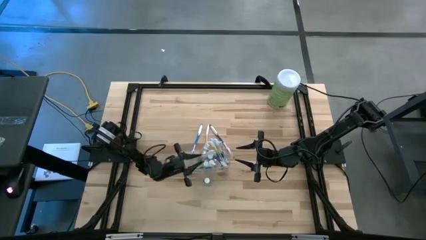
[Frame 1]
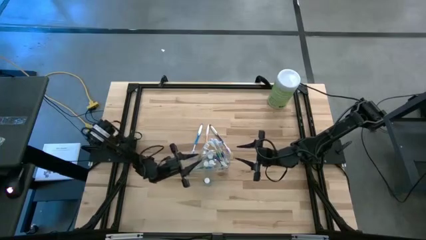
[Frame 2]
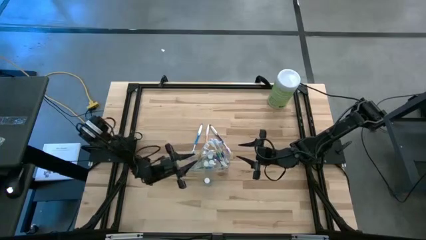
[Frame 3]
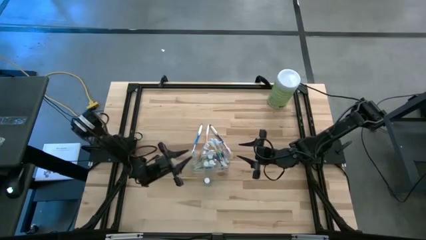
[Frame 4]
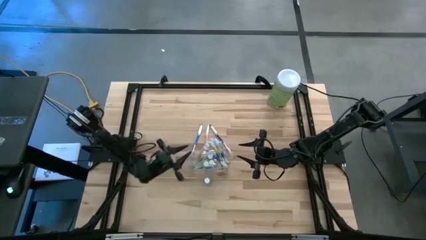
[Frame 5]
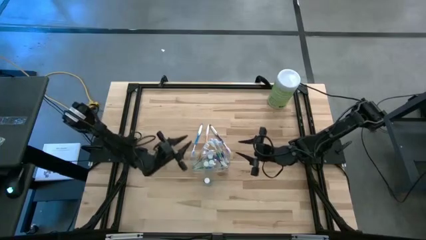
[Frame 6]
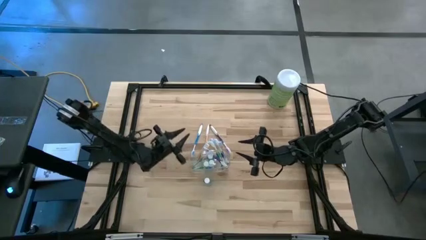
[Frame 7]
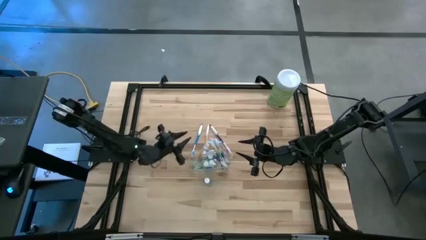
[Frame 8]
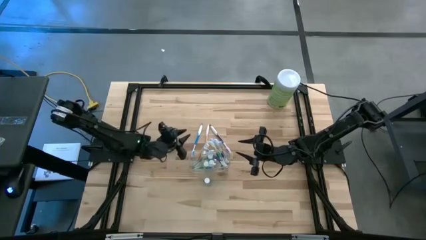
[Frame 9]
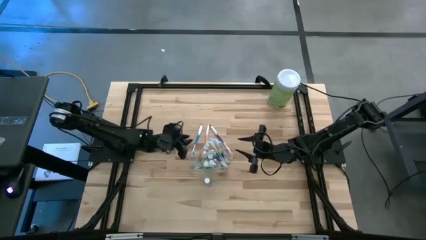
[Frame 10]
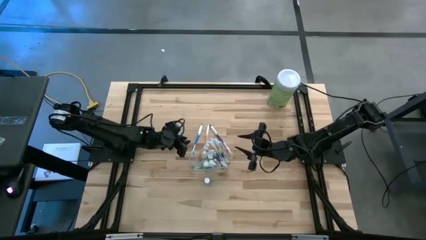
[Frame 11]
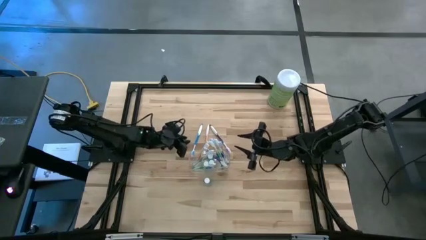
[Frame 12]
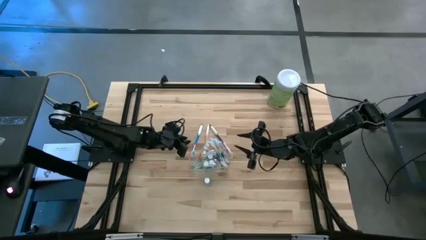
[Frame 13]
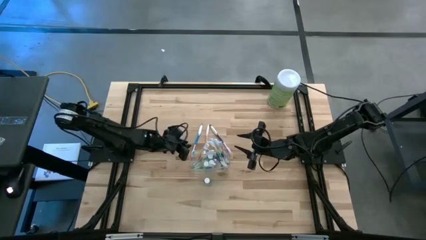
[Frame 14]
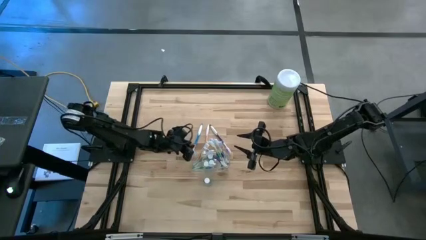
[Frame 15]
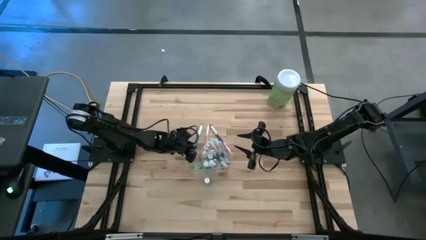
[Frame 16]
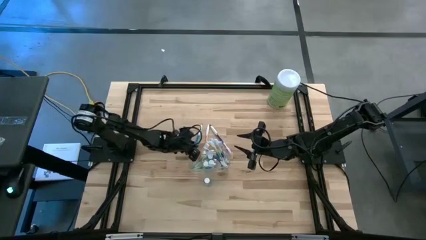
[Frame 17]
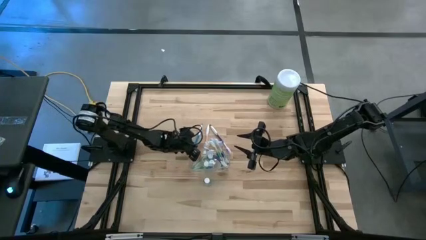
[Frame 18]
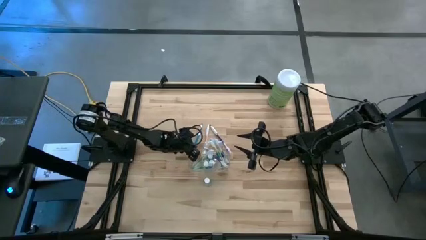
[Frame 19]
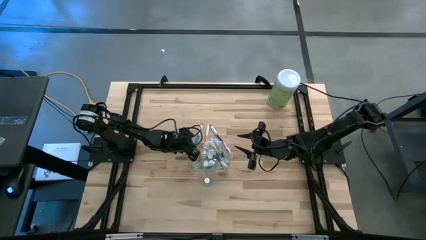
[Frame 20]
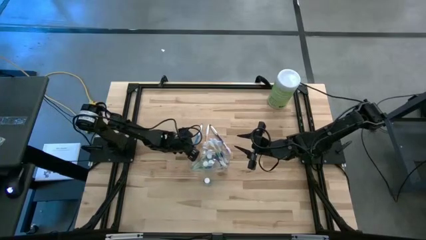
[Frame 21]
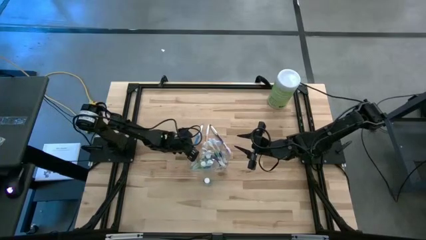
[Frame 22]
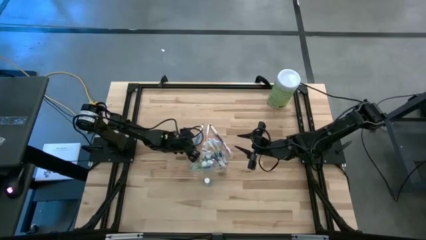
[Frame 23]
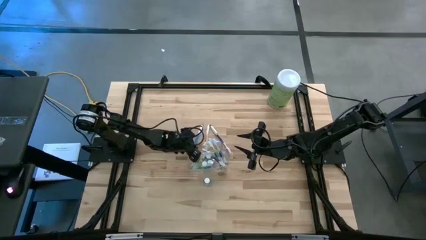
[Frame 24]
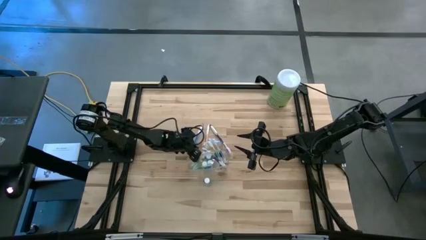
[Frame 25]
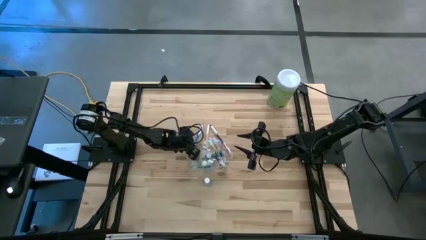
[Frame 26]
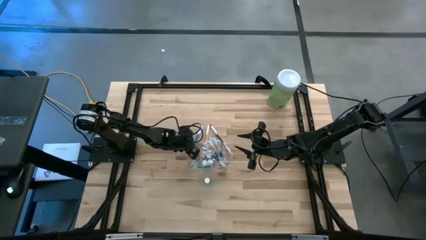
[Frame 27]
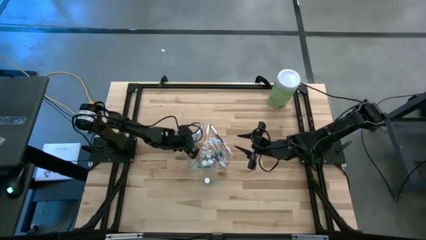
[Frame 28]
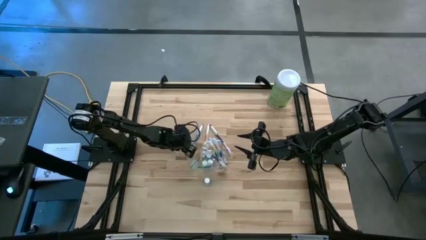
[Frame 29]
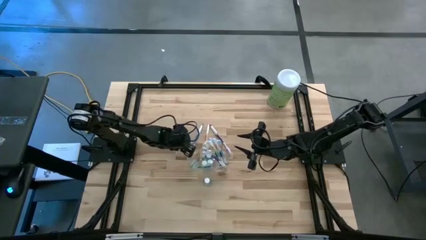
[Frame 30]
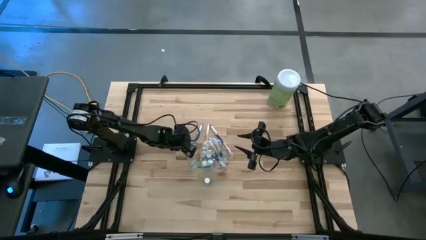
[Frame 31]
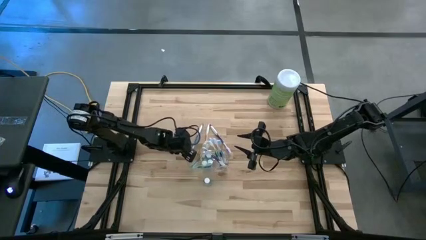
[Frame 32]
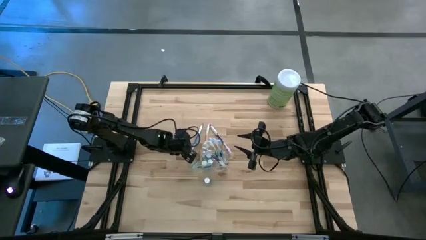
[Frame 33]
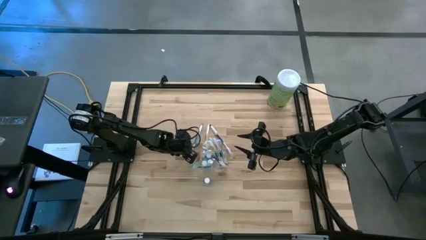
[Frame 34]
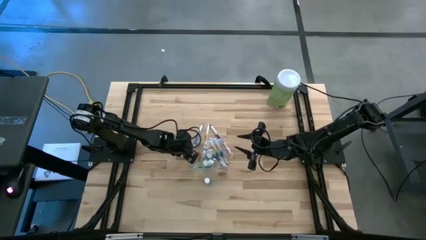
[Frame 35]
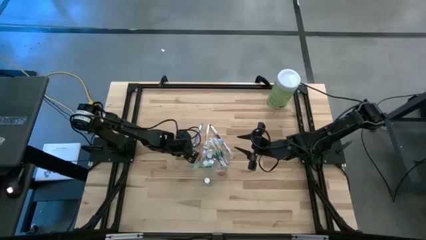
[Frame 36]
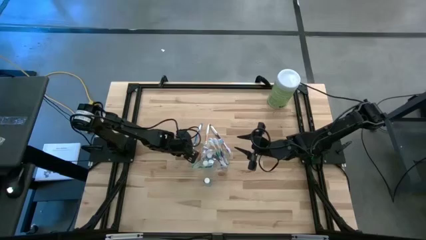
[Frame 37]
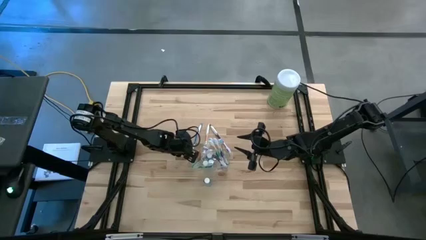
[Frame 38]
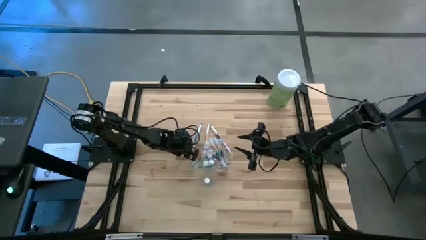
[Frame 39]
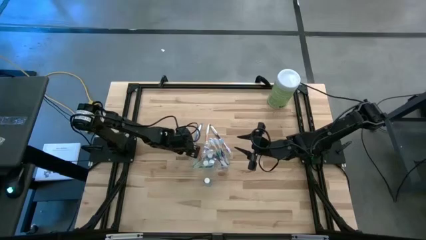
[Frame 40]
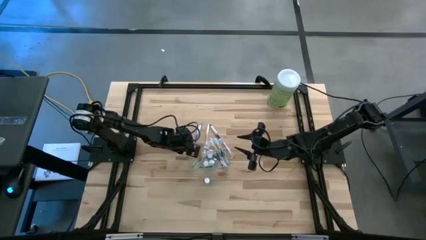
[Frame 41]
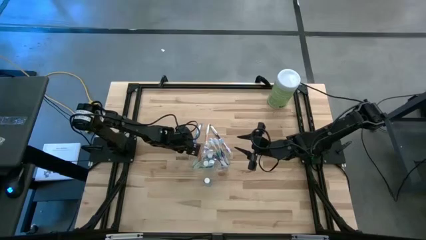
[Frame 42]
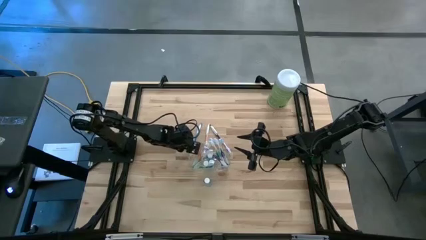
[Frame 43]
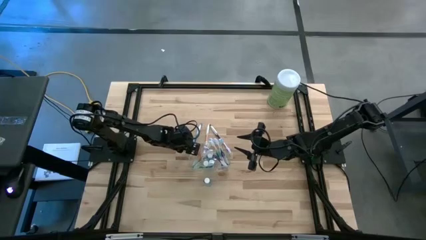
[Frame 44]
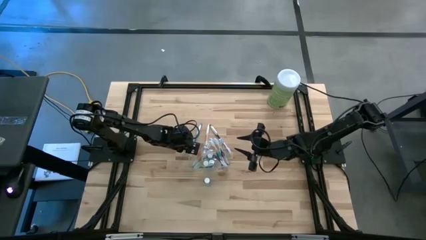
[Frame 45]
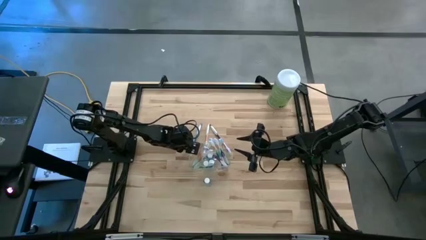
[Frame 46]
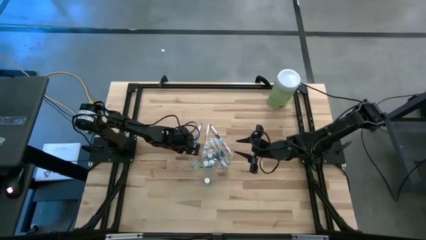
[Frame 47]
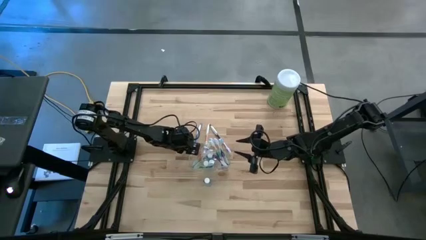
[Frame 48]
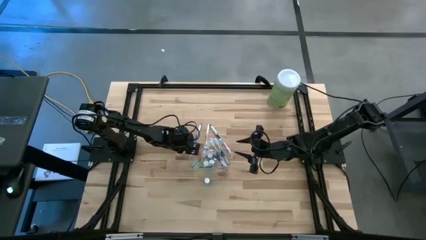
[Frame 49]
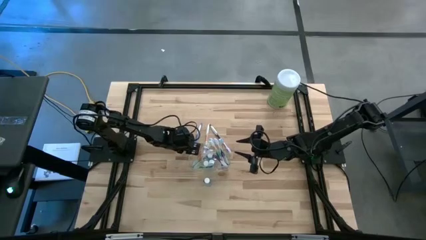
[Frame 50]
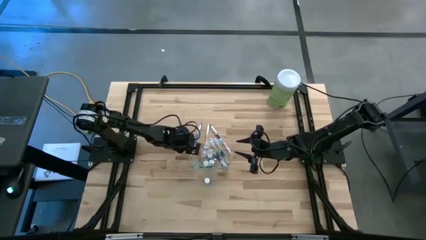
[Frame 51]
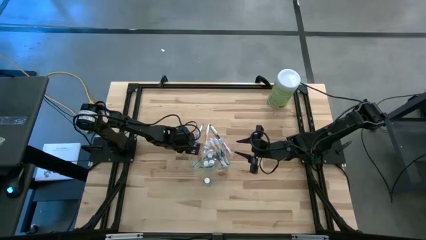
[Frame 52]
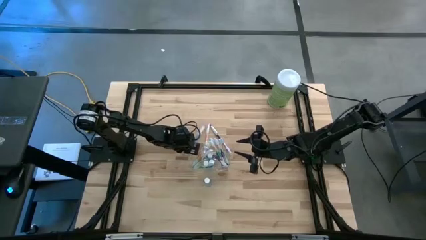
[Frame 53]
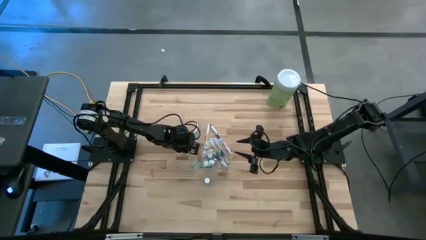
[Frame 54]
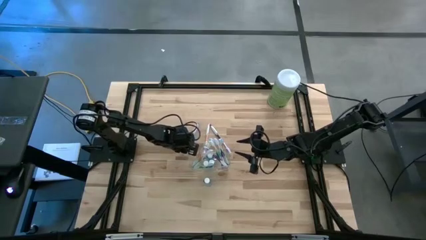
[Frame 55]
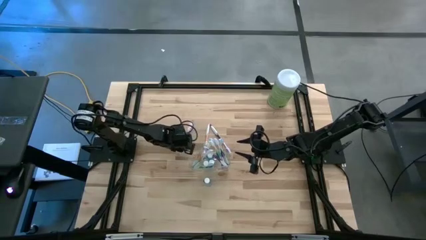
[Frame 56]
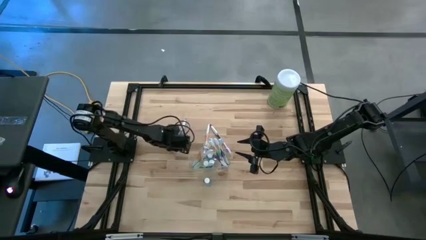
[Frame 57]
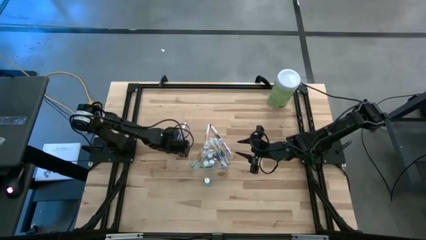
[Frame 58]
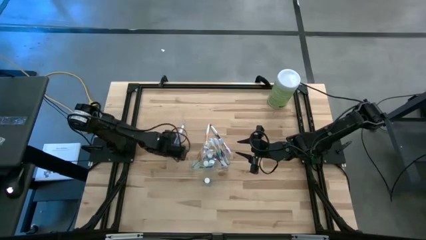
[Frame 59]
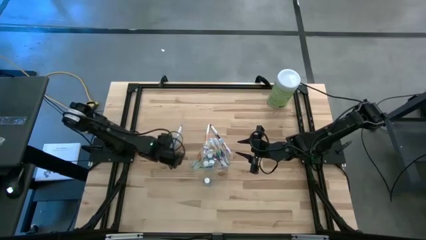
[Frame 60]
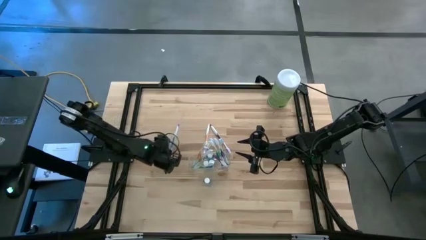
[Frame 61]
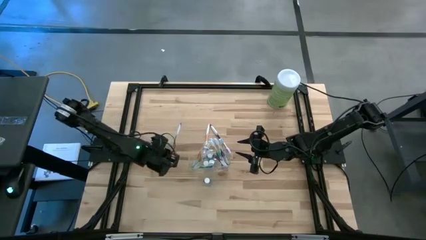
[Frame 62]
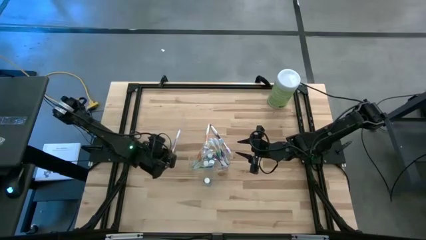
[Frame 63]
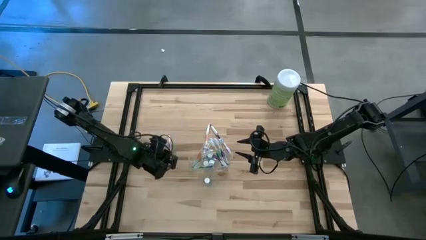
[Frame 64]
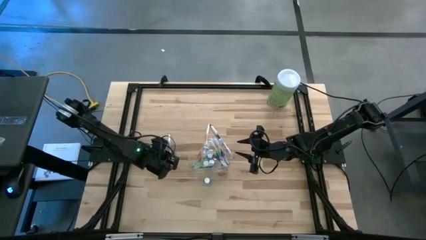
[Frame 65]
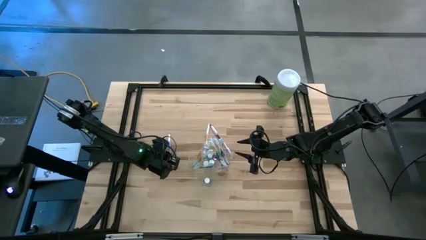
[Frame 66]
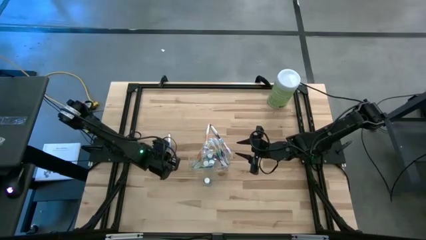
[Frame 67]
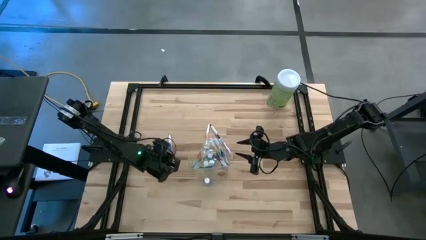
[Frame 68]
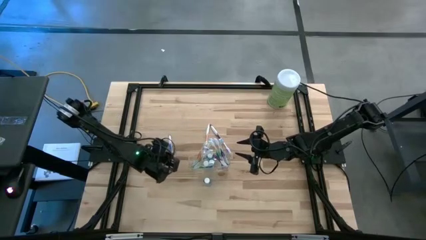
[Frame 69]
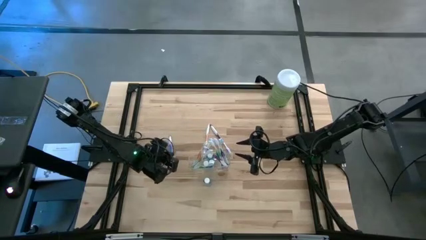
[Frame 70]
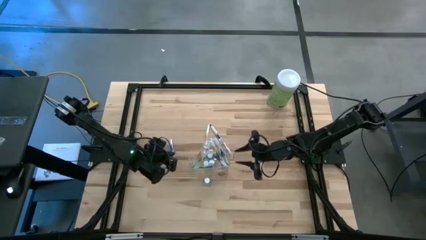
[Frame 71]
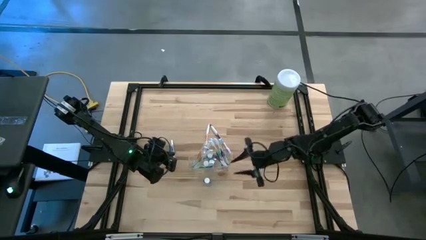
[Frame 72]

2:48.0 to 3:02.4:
Task: Pick & Place toothbrushing station
Put the blue toothbrush into the transparent organizer
